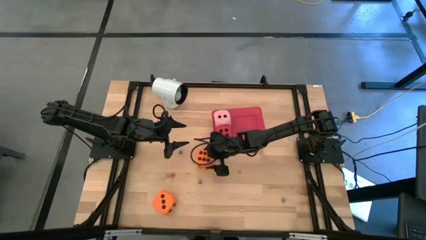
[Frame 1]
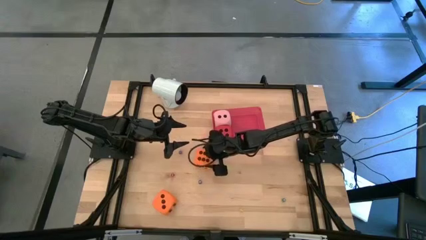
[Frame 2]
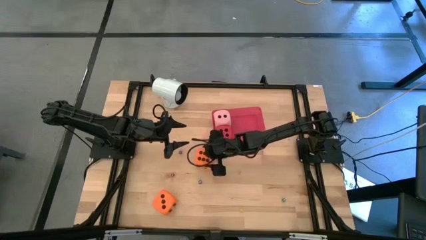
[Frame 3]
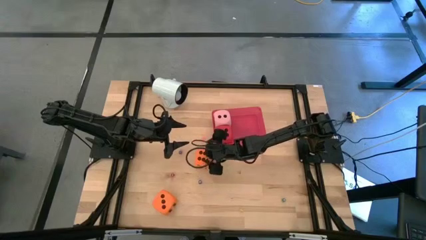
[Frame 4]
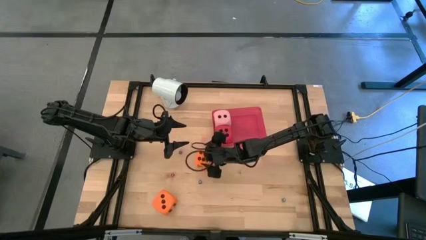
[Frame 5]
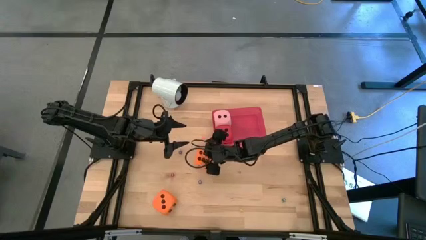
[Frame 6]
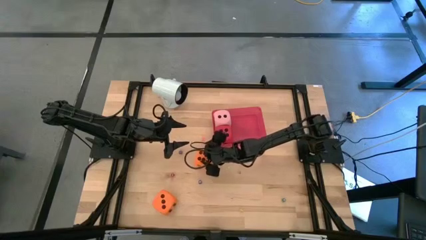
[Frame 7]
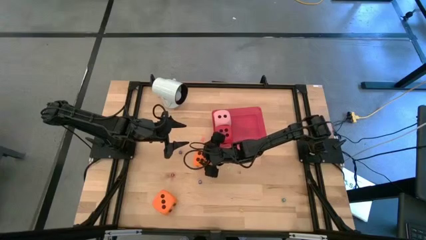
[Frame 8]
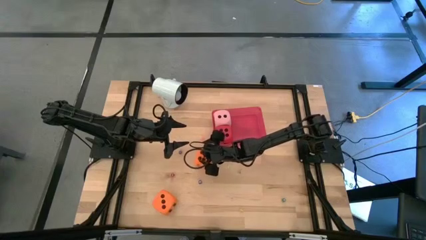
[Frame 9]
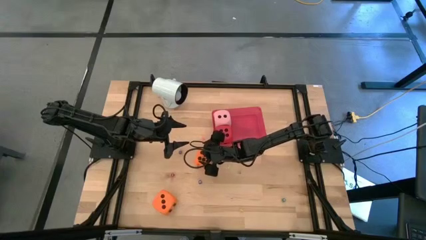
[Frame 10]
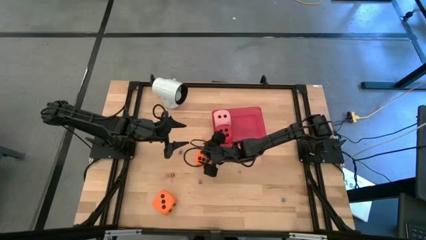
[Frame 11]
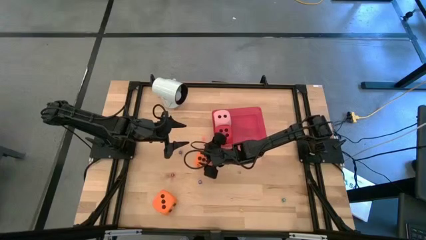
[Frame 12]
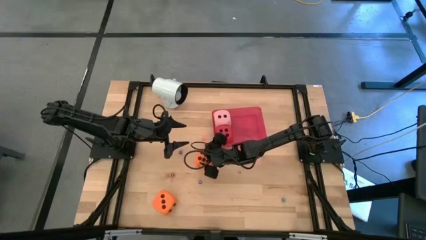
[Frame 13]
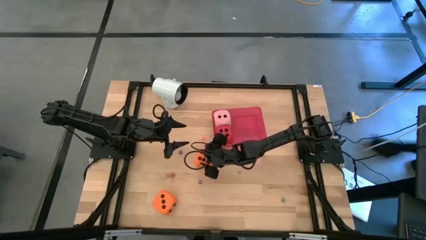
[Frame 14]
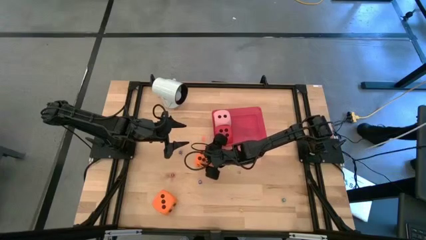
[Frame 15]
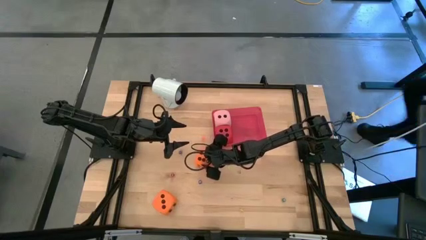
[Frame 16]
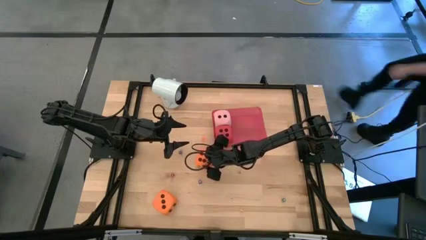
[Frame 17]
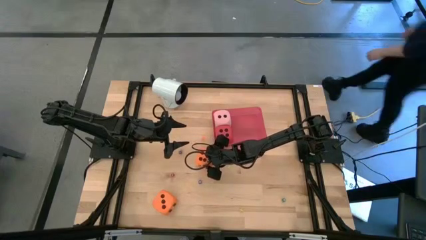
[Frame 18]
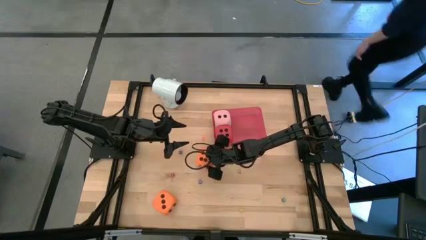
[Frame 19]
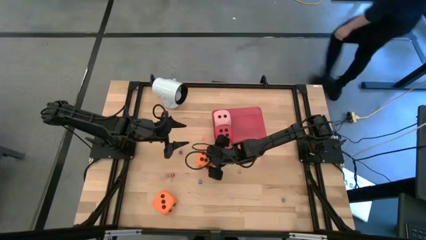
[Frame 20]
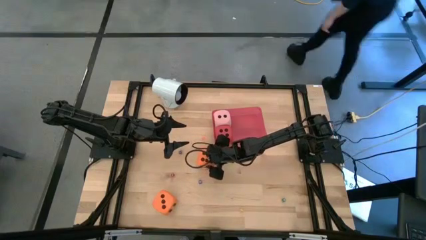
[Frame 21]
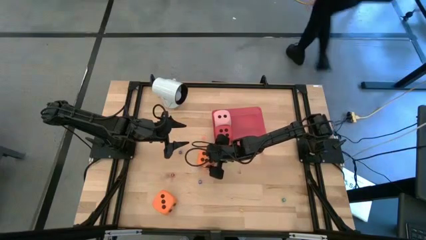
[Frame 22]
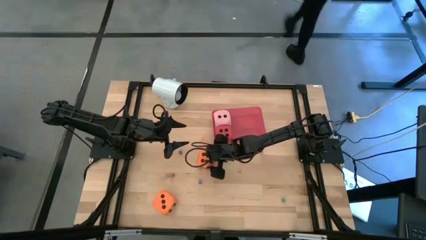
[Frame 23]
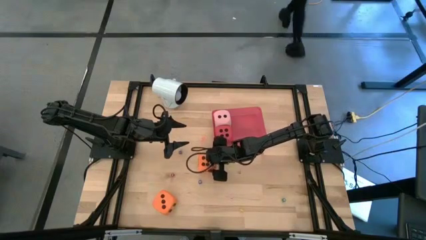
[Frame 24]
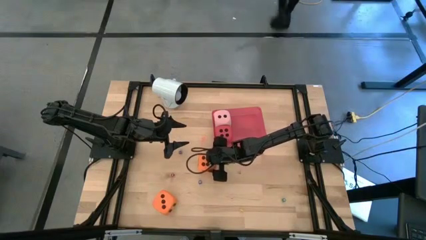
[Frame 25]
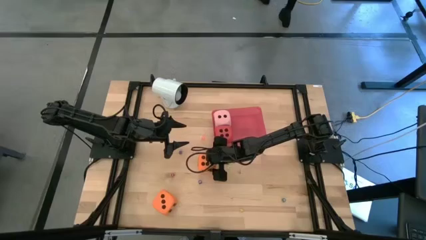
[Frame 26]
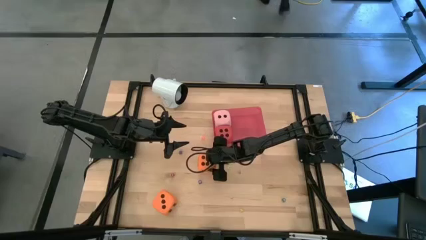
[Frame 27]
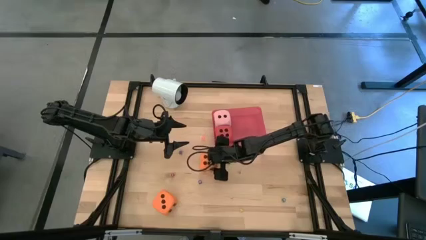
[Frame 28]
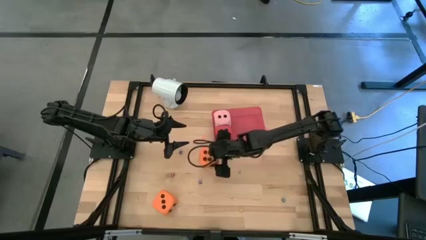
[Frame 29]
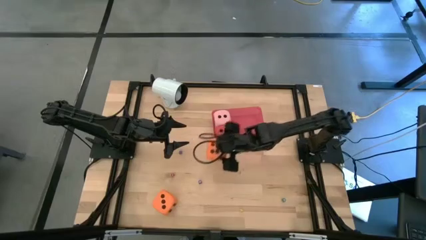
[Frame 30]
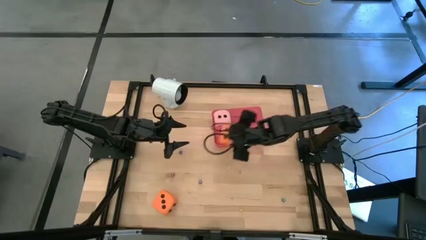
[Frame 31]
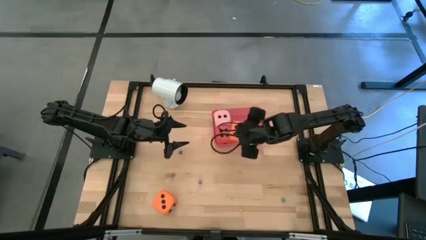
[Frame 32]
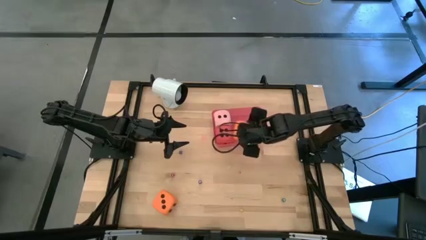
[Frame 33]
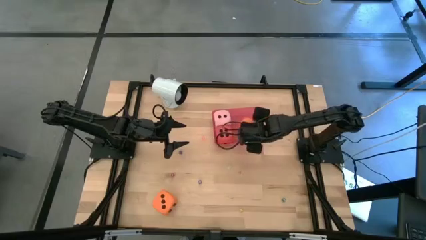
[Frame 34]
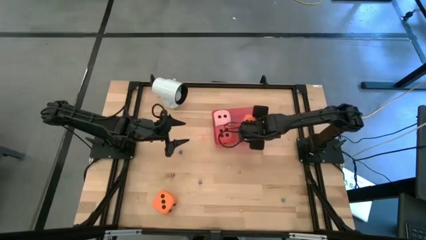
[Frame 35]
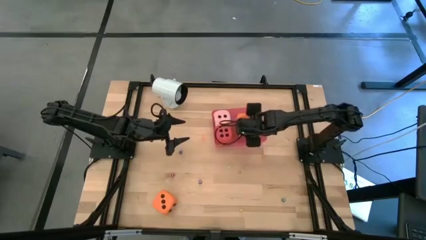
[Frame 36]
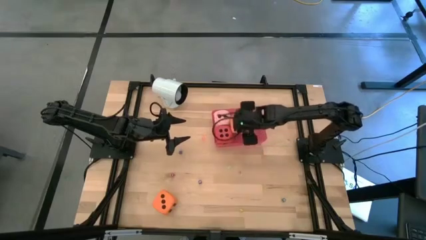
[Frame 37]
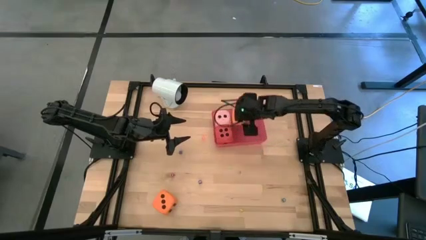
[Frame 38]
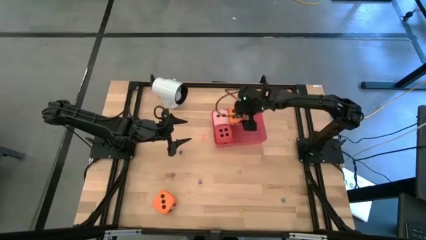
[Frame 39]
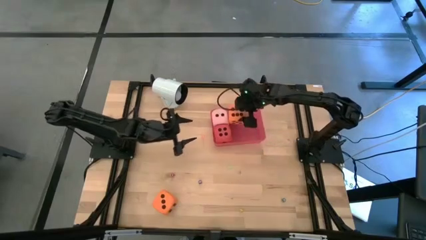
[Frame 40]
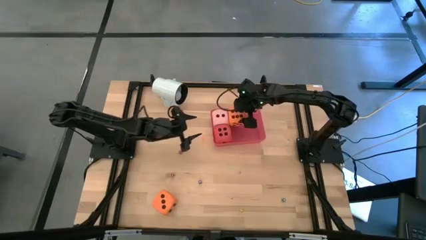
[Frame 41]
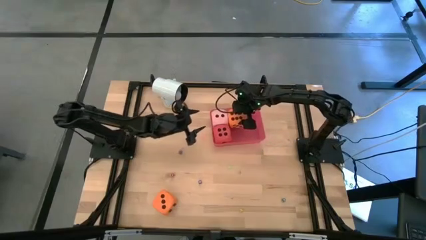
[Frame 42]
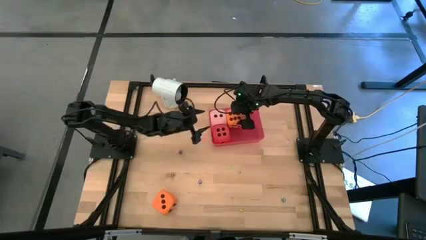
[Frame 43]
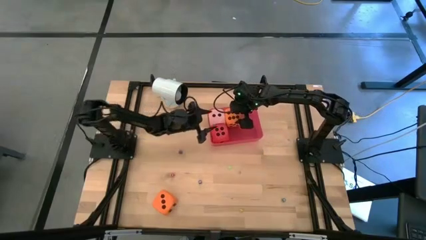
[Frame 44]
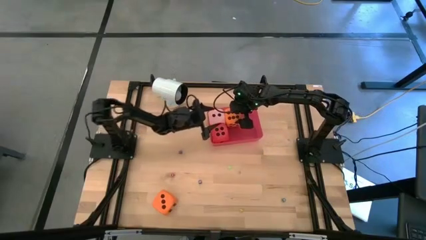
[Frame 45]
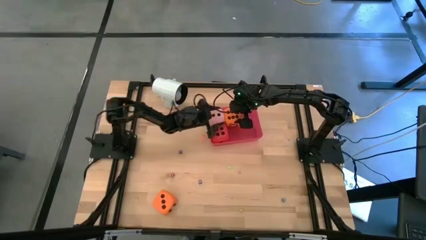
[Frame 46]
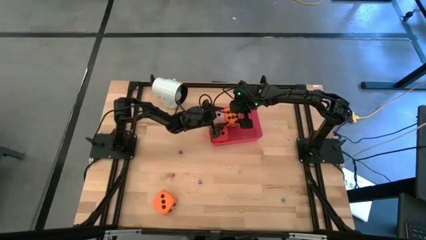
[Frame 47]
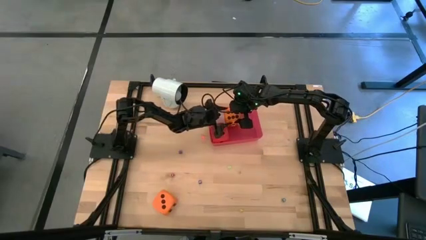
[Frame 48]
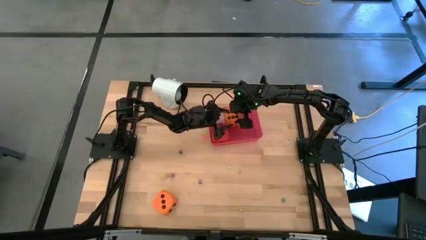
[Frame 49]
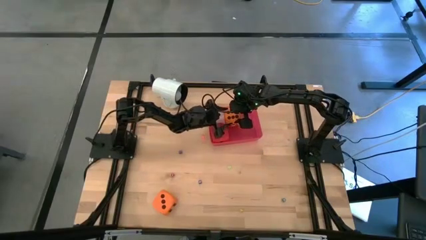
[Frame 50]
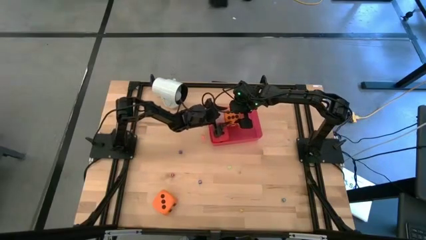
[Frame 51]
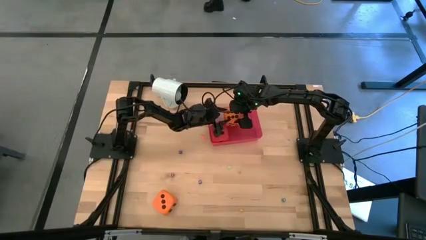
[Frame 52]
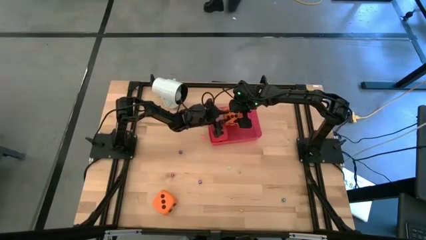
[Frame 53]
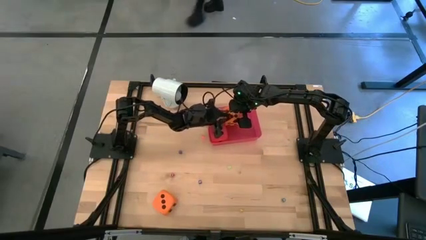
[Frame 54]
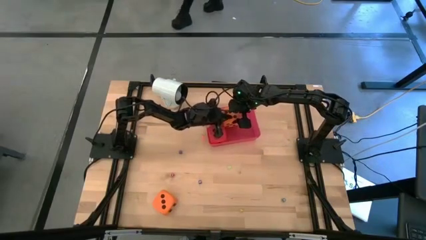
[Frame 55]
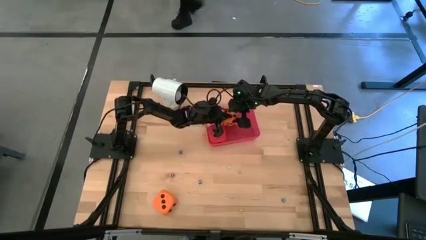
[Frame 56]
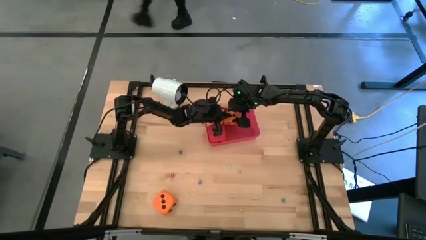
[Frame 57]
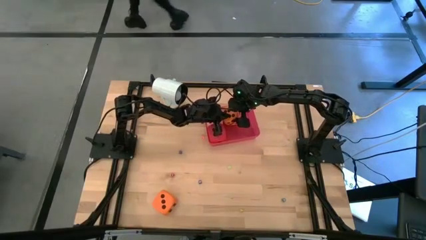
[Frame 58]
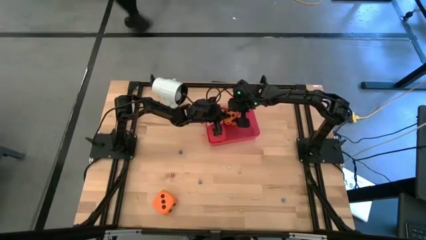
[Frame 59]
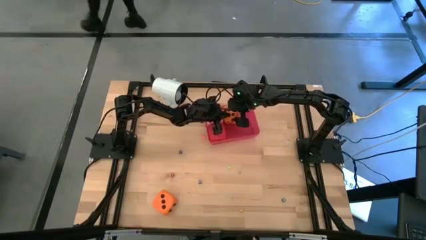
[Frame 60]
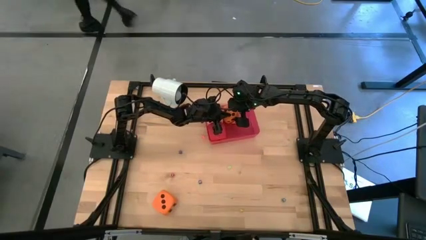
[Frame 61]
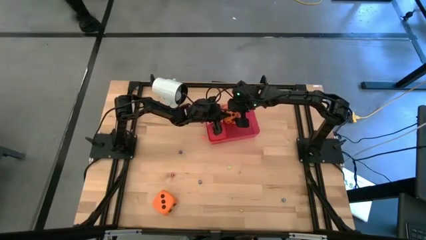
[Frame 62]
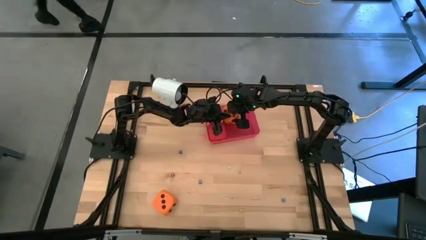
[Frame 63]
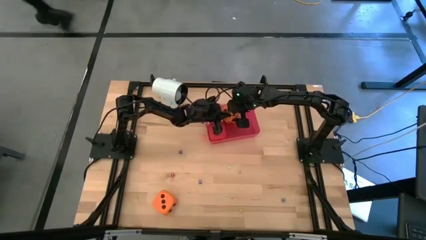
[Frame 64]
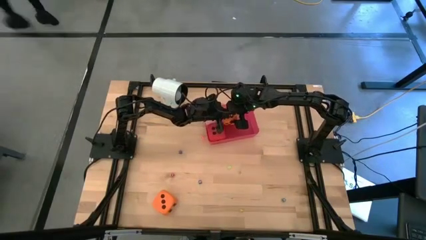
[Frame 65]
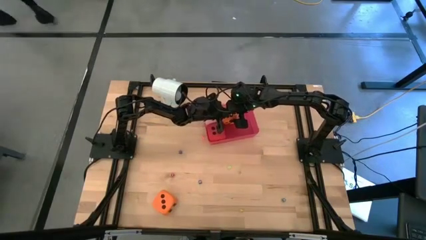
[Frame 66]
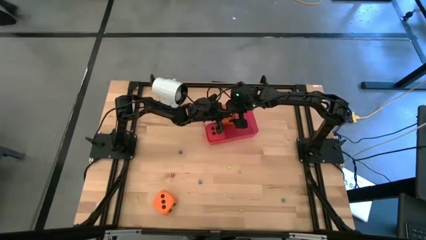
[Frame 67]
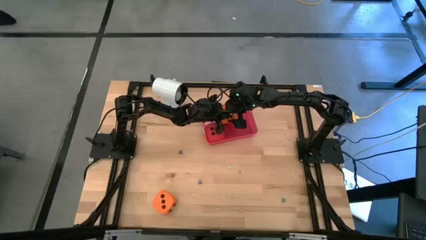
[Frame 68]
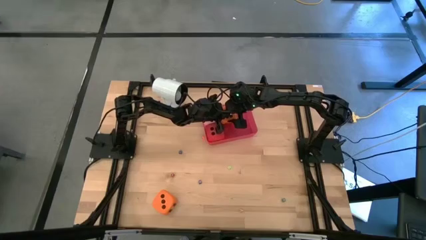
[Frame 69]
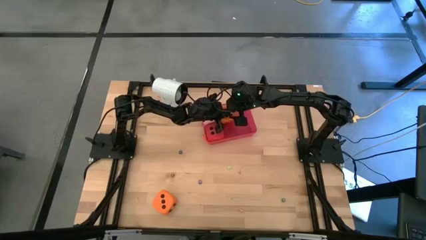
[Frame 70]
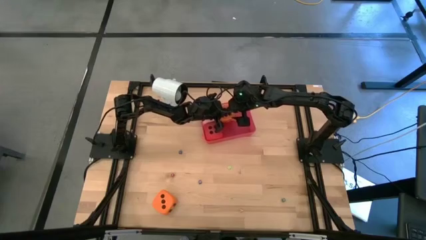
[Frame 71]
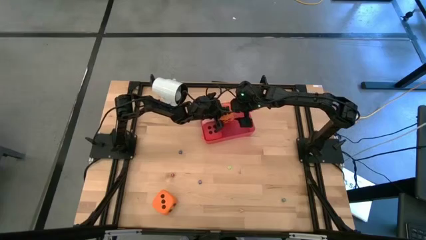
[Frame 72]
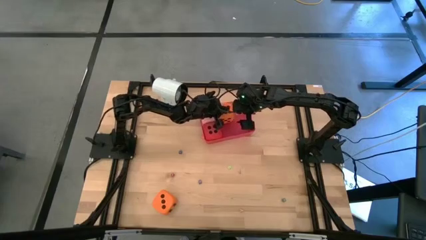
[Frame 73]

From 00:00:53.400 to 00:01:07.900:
Task: Pick & Place Dice
Put the big top orange dice into the red bin
